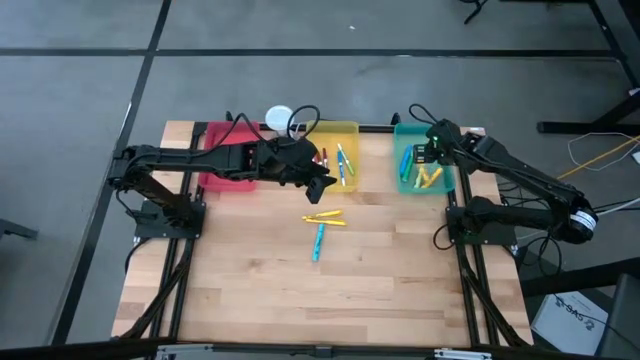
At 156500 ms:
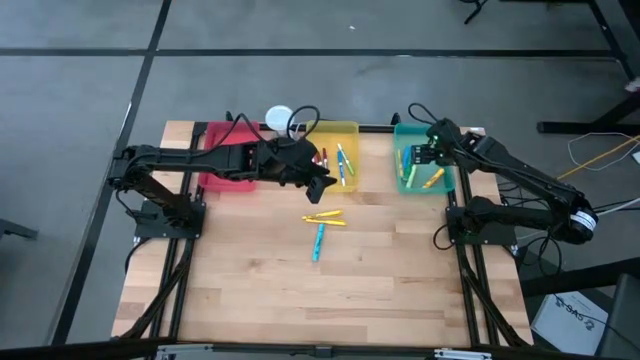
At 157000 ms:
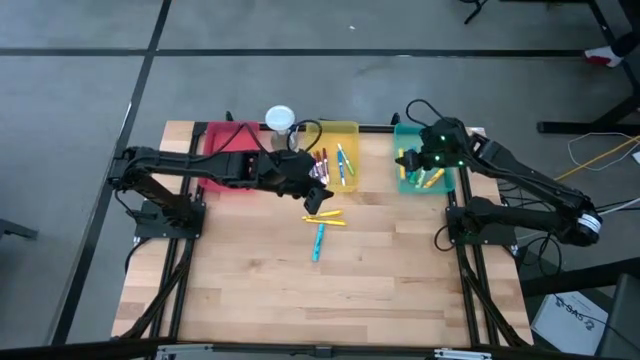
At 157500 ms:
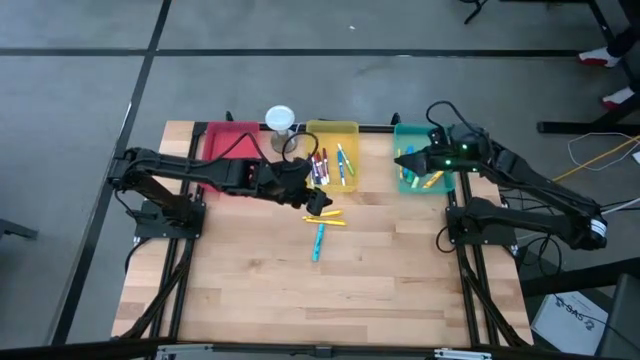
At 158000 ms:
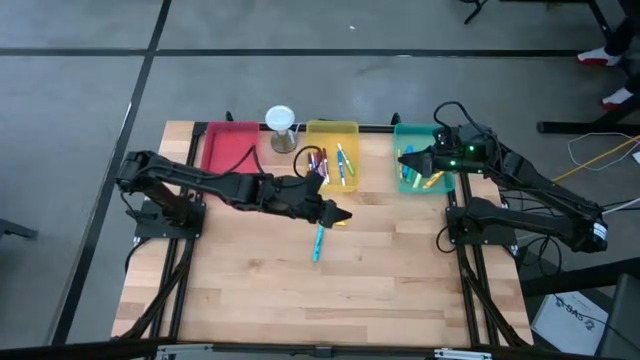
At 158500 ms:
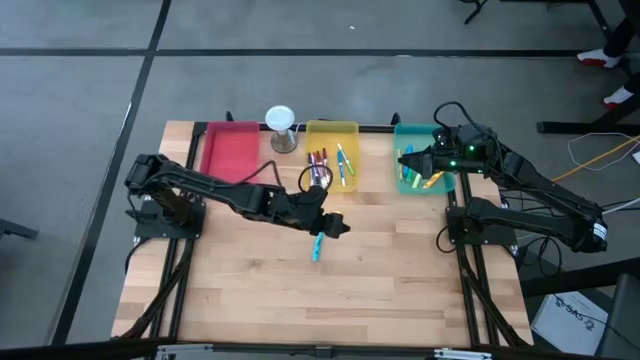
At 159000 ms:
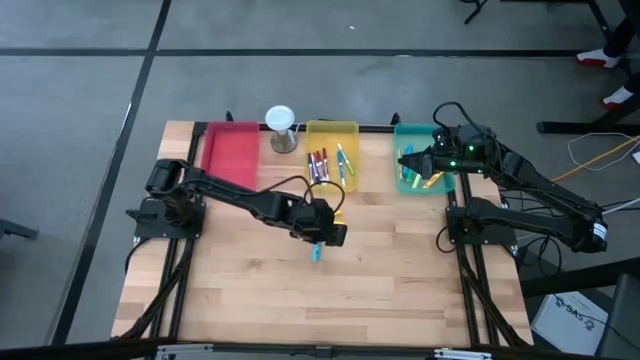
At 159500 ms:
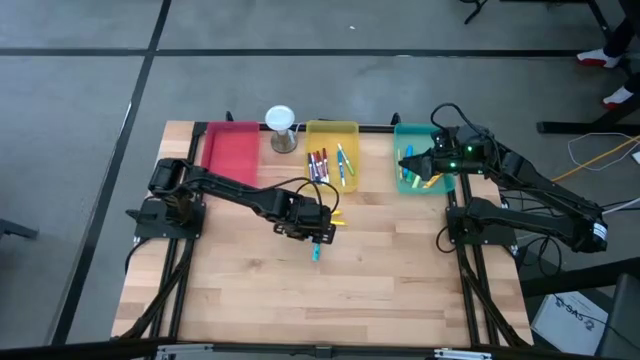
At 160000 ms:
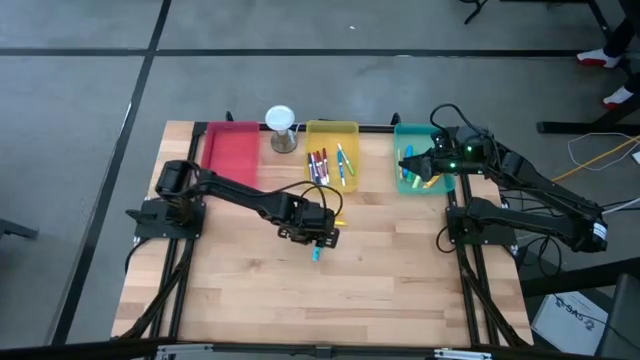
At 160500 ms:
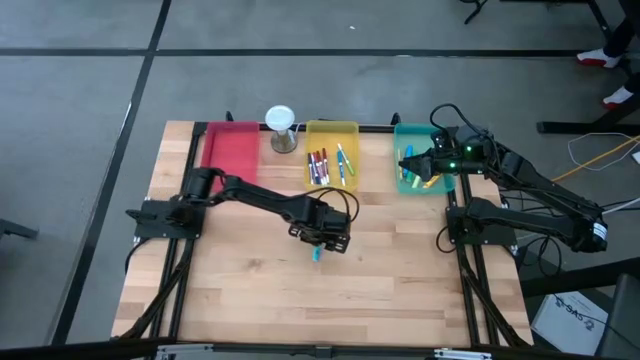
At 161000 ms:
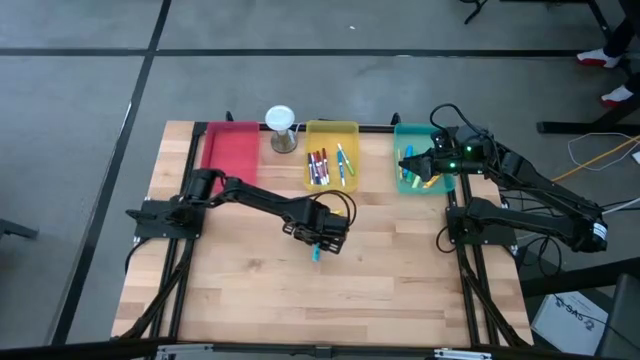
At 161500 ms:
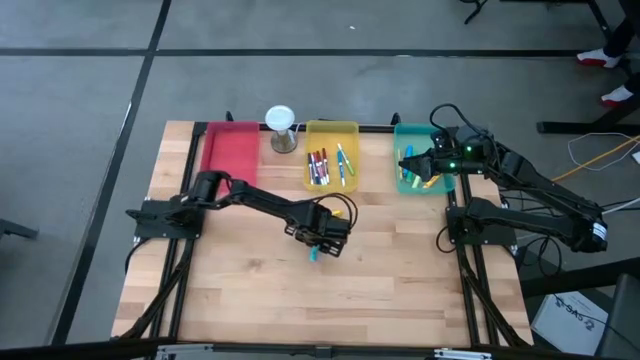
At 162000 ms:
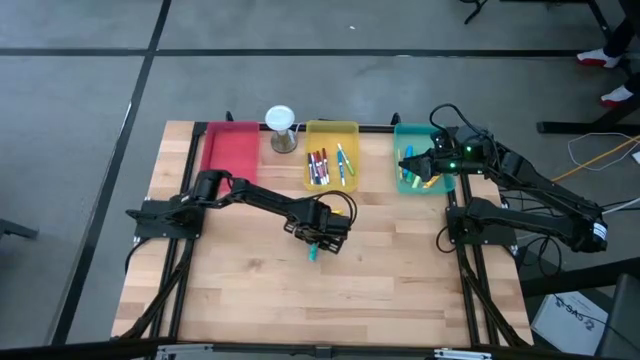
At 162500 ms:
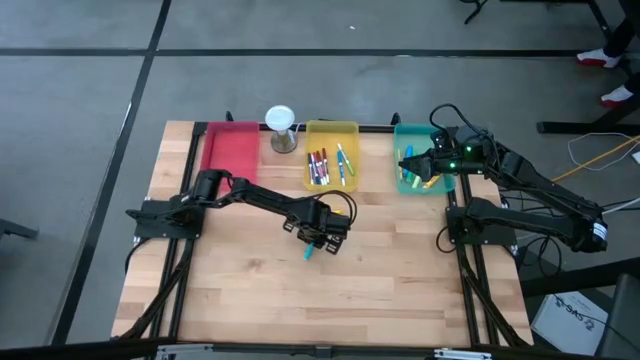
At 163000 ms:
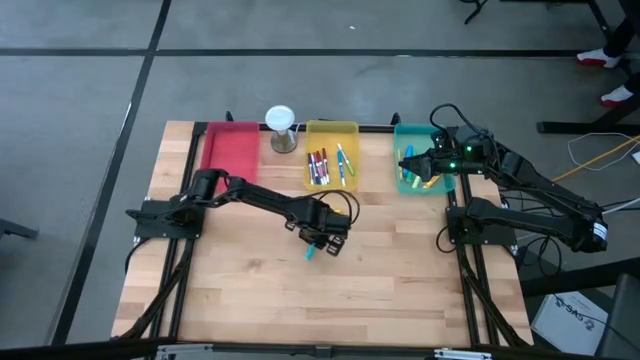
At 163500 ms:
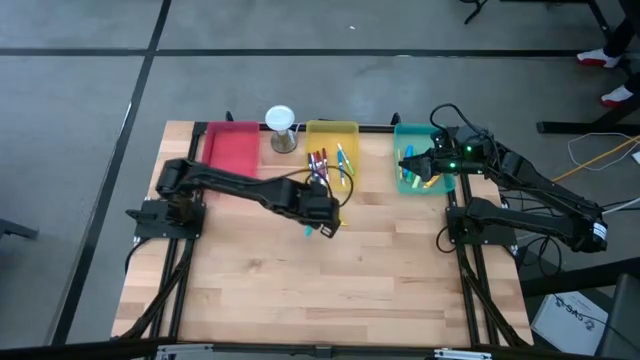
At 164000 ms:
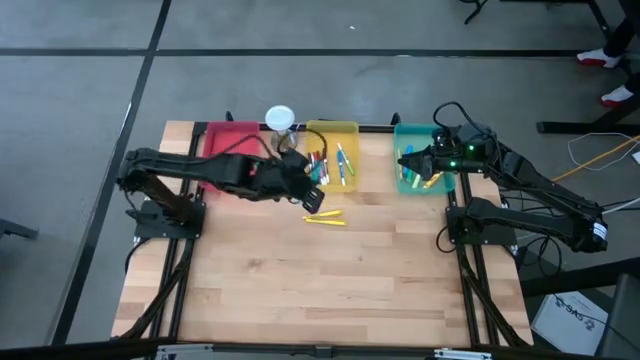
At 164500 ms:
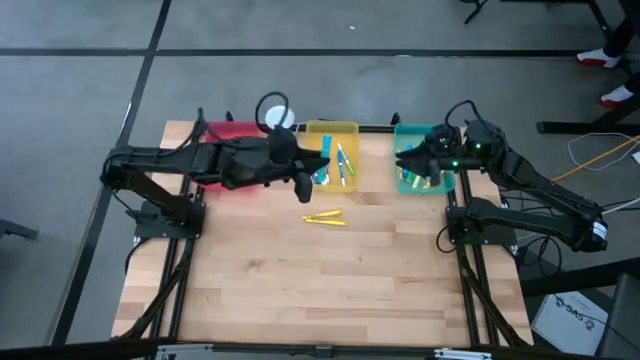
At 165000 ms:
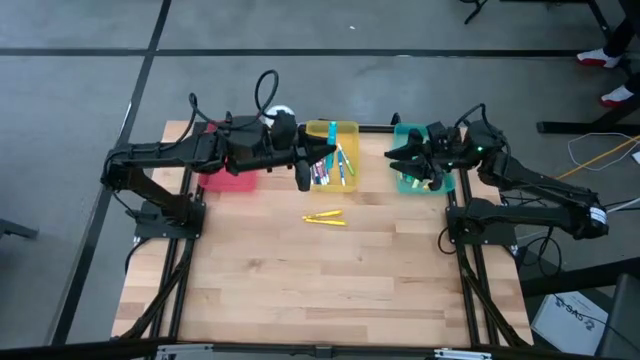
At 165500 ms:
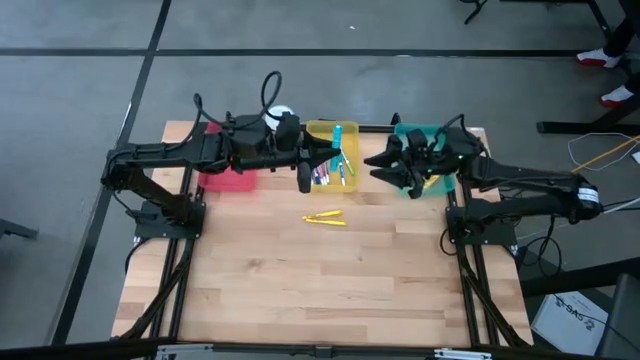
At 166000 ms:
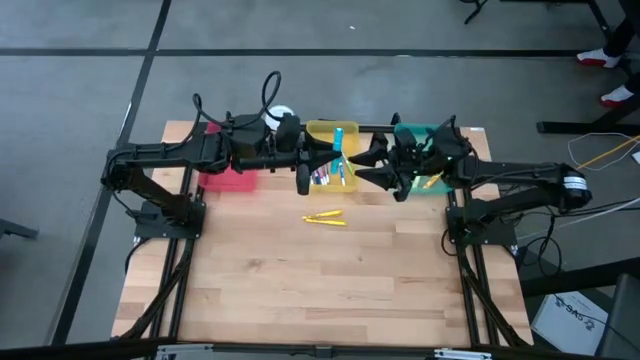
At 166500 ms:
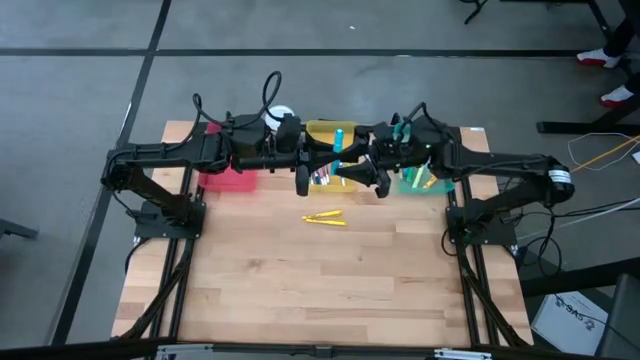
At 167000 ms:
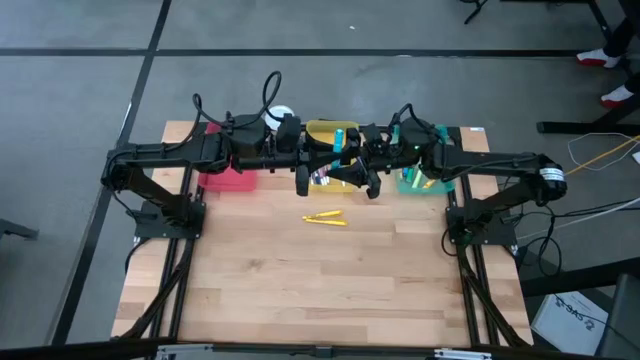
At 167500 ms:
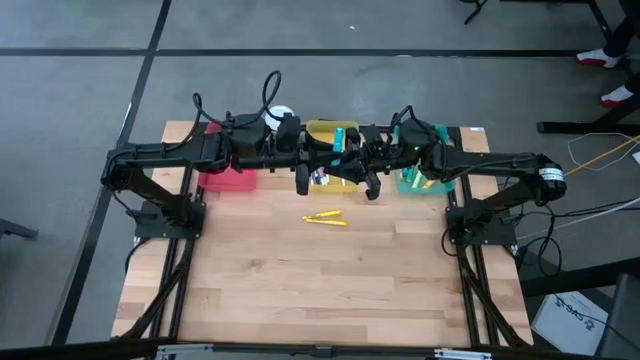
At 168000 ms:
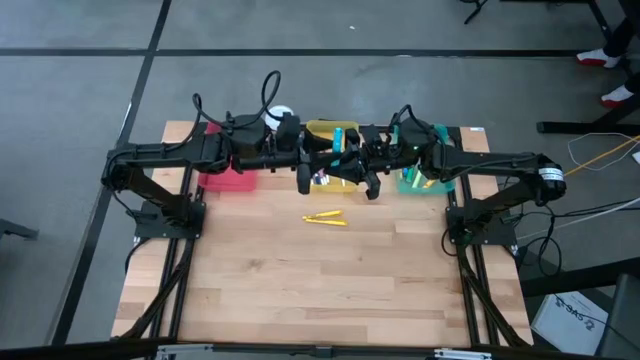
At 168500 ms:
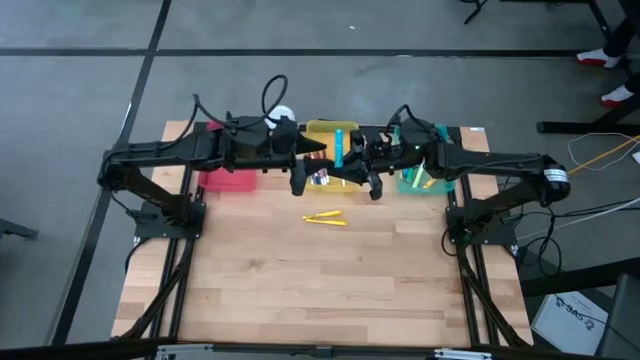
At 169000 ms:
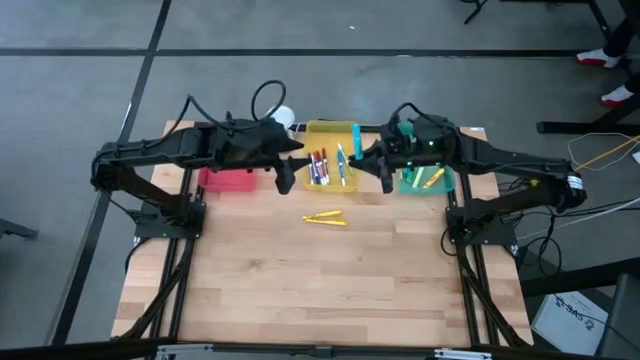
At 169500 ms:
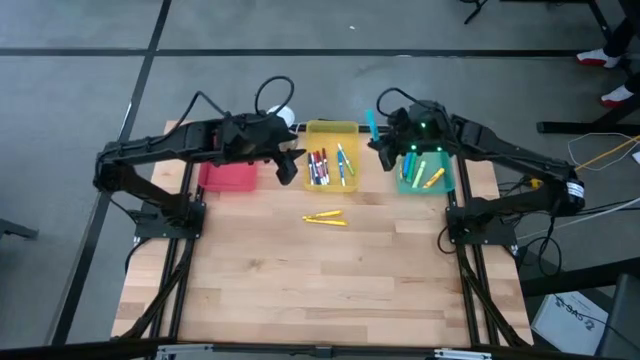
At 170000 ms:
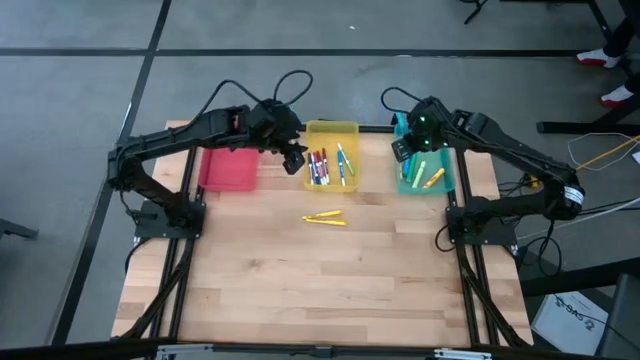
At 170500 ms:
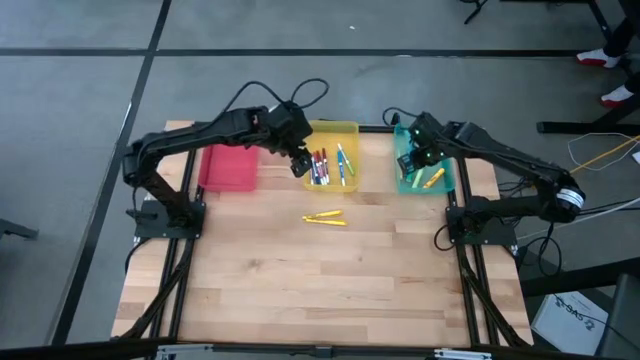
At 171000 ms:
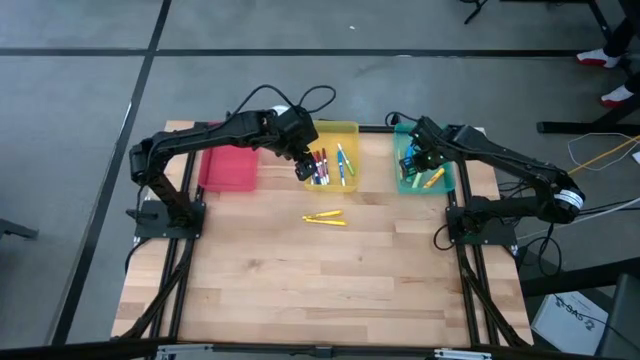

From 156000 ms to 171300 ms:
Task: Pick & Place Markers
Put the light blue highlighter into the blue bin

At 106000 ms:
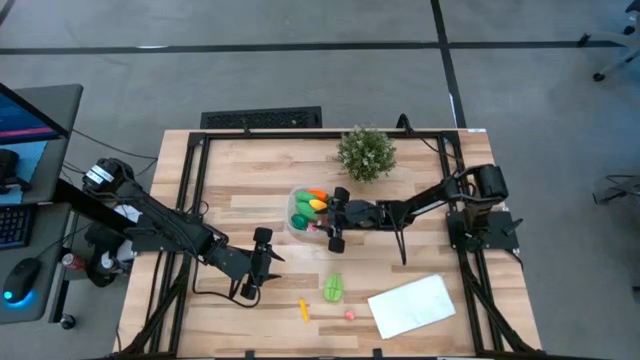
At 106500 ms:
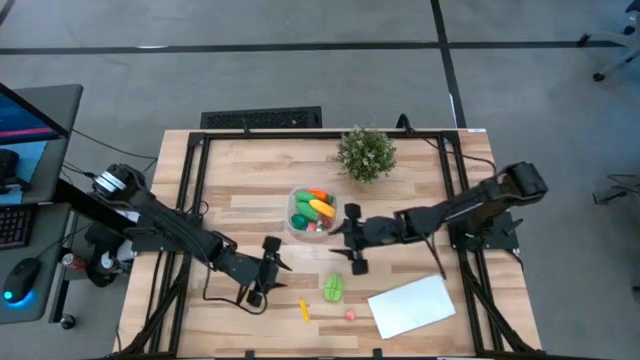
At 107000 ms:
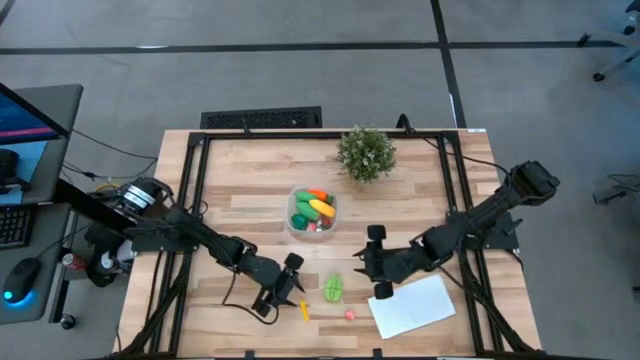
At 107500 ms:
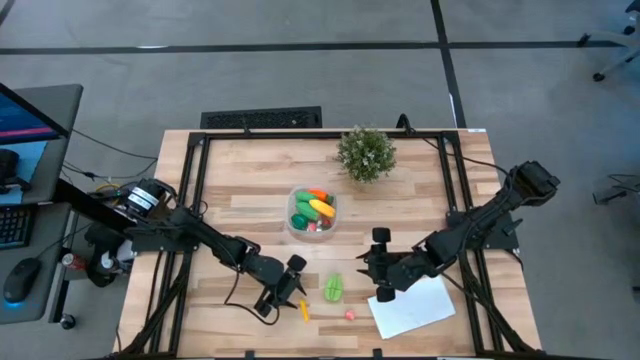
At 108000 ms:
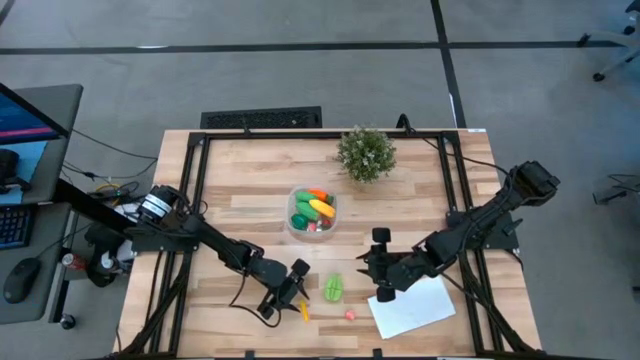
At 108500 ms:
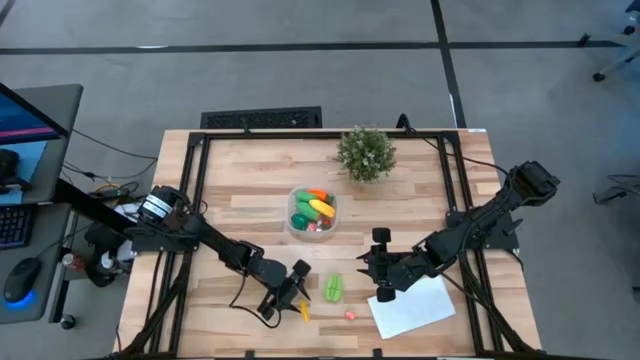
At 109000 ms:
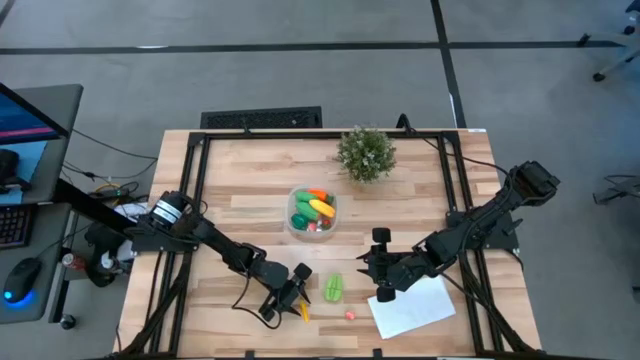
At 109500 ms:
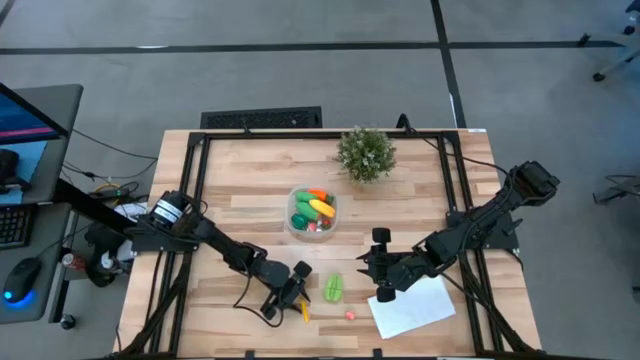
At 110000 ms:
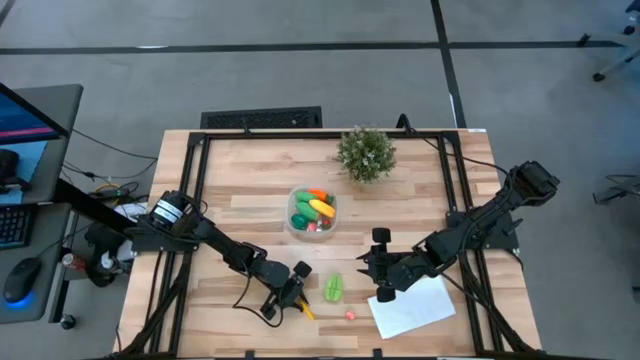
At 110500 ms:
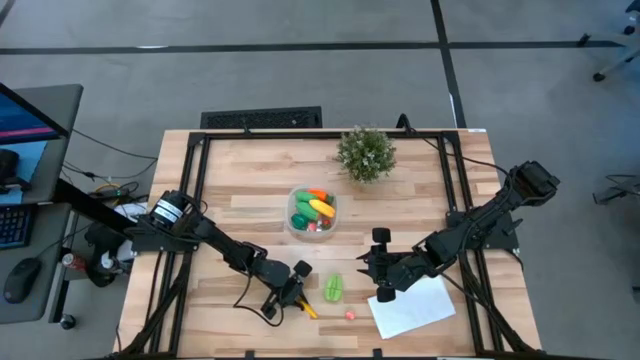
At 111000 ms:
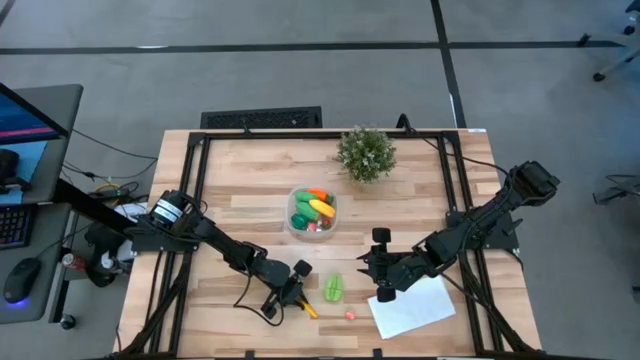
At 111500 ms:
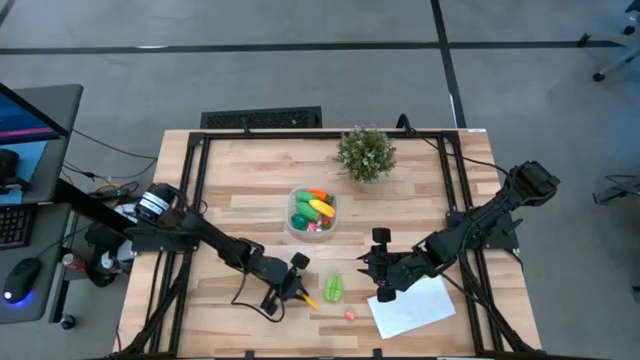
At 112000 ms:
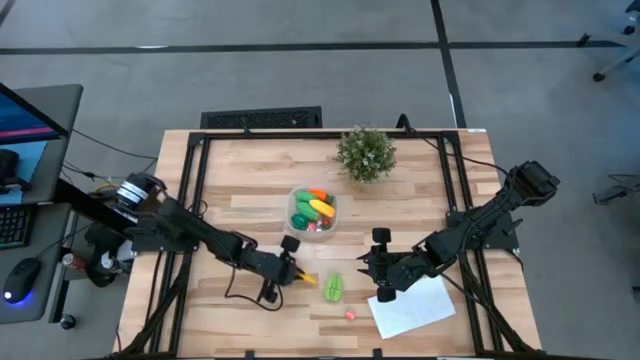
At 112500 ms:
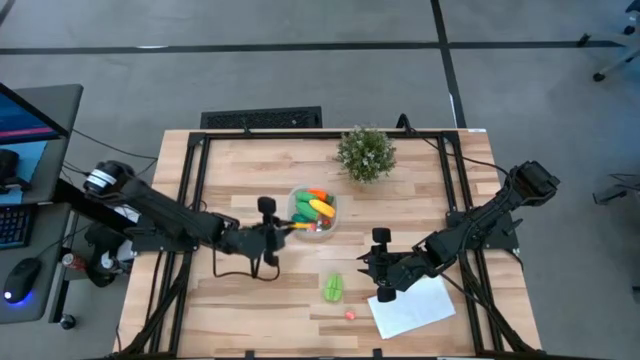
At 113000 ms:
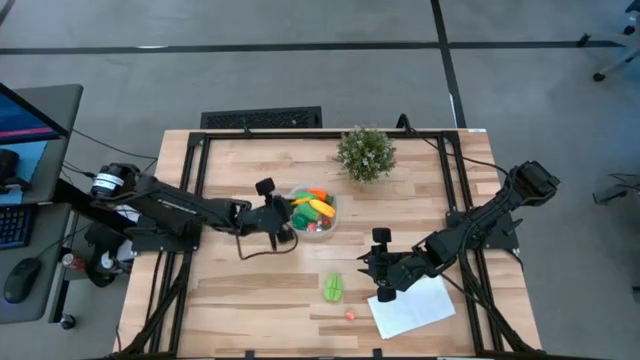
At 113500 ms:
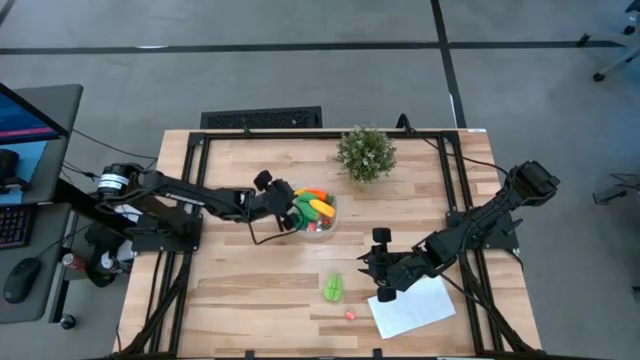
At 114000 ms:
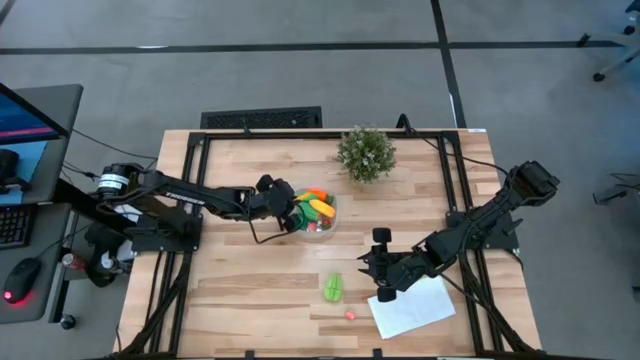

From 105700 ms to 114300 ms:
Task: Pick and placing Produce into tupperware
Put the yellow corn into the transparent container
